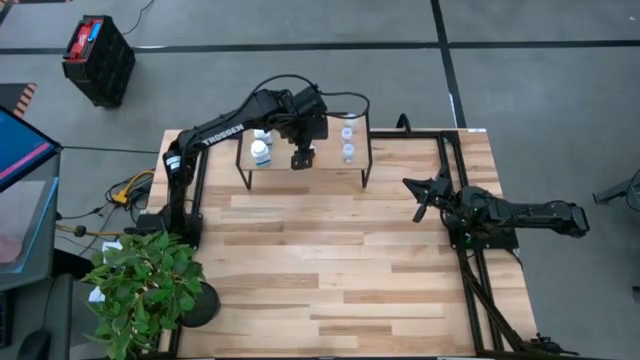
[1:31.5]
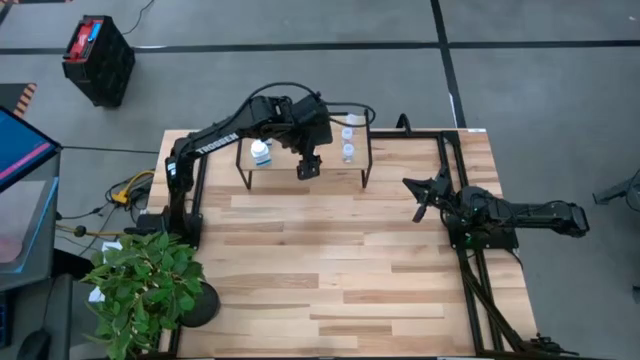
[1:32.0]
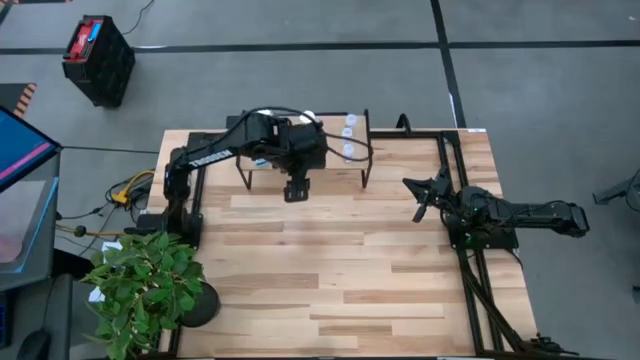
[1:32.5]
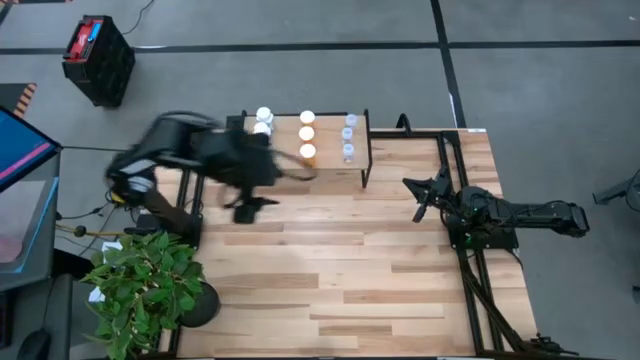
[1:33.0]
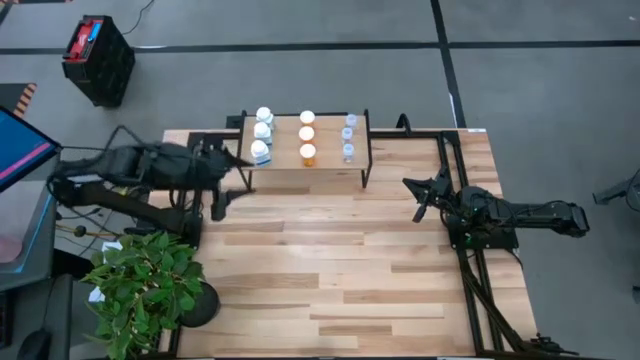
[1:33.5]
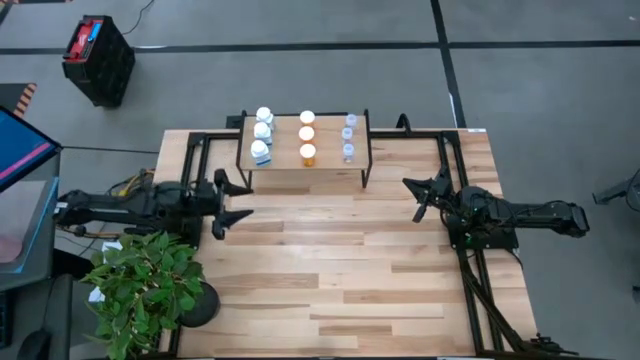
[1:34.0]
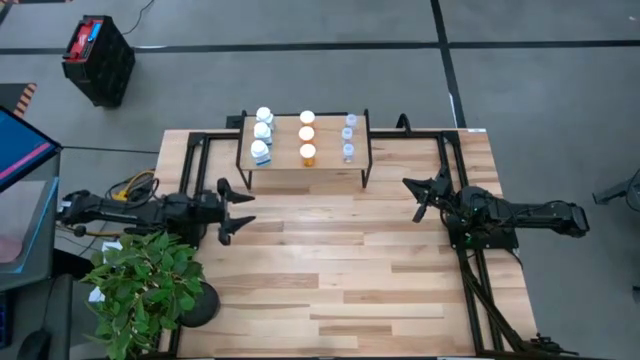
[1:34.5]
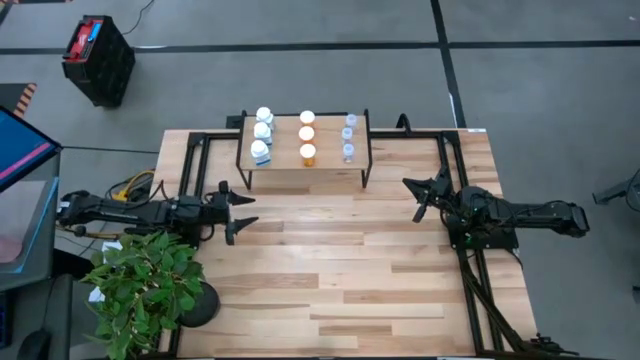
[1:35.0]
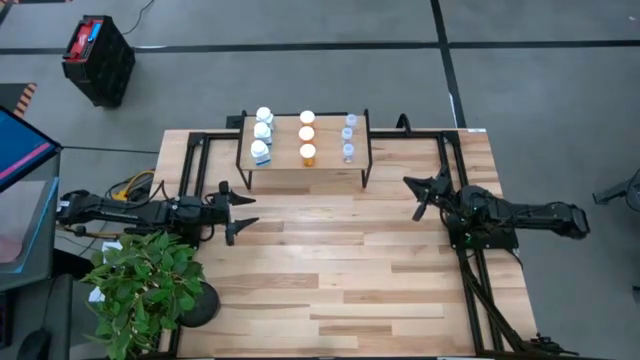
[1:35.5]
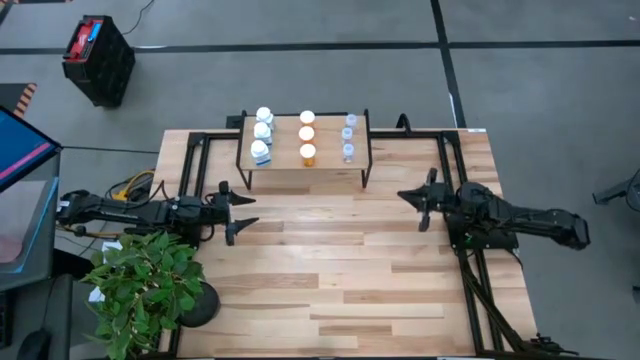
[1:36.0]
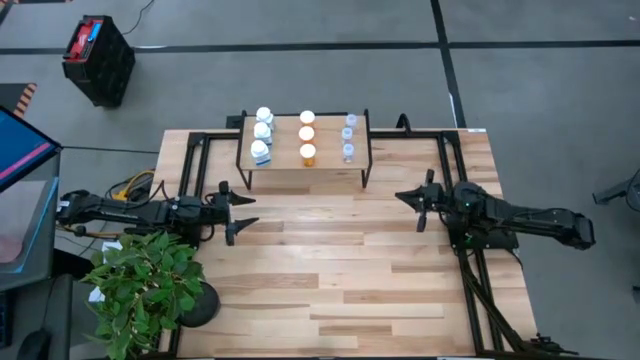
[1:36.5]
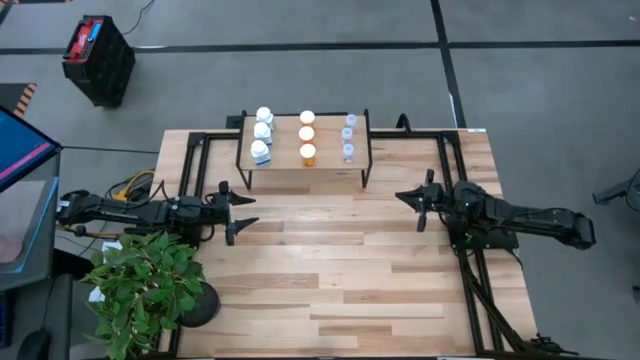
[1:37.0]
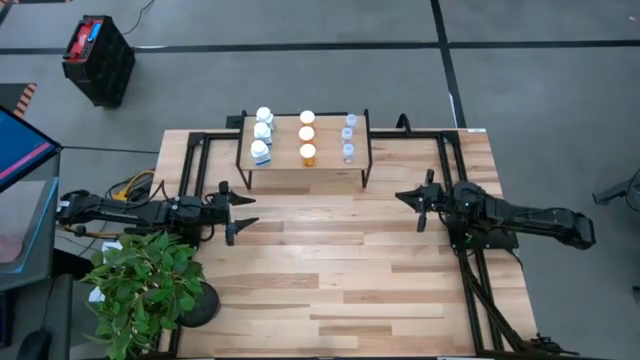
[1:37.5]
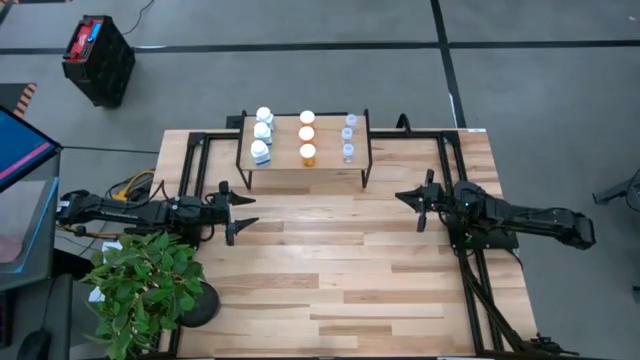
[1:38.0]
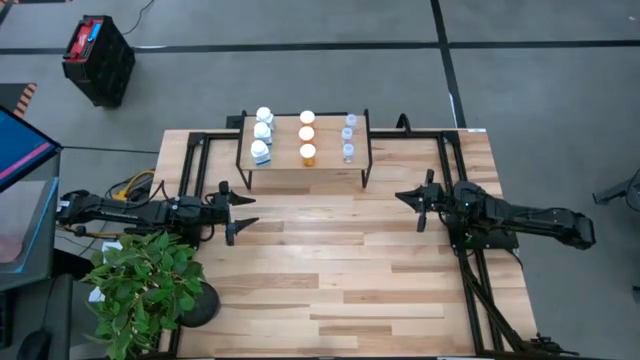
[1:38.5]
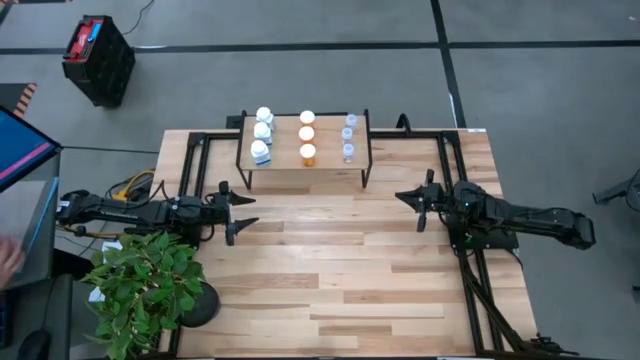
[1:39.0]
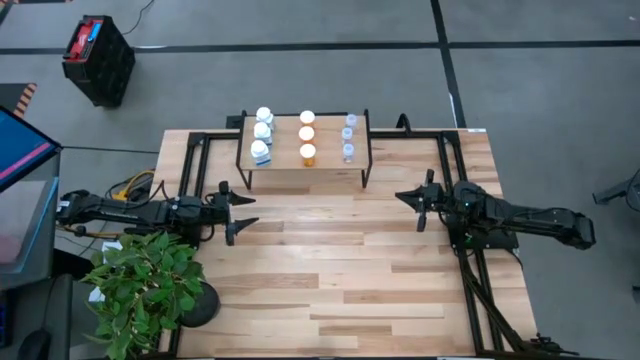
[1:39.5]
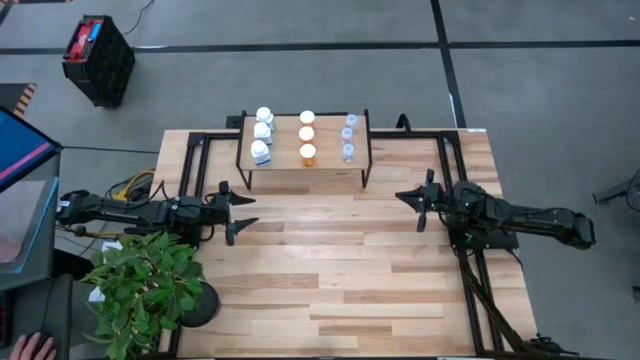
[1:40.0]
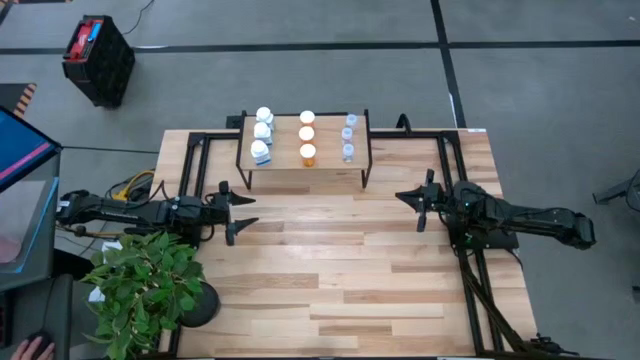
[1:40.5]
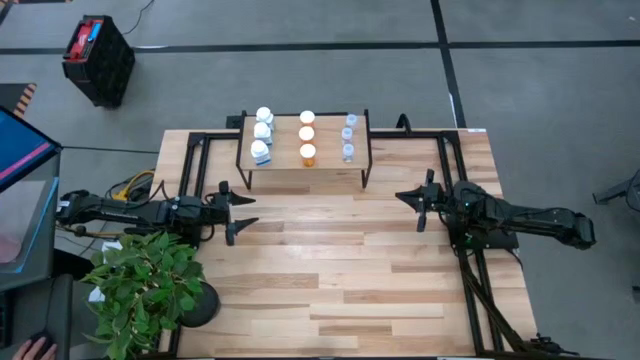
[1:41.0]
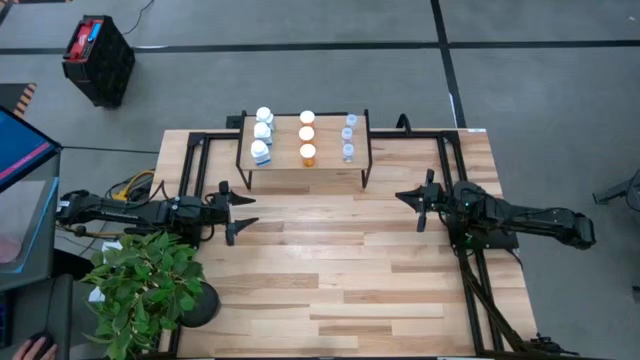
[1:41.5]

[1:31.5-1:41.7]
Task: Pick and place medicine bottles onto shelf by color
Return to Home Position

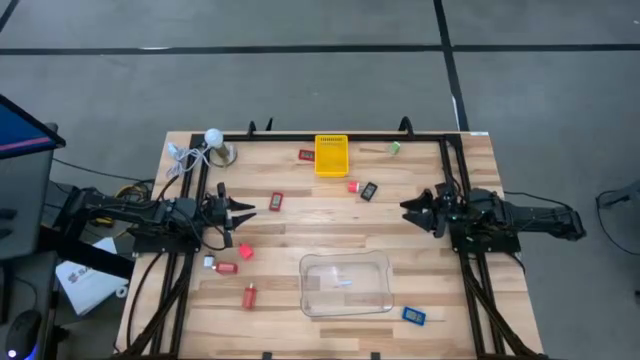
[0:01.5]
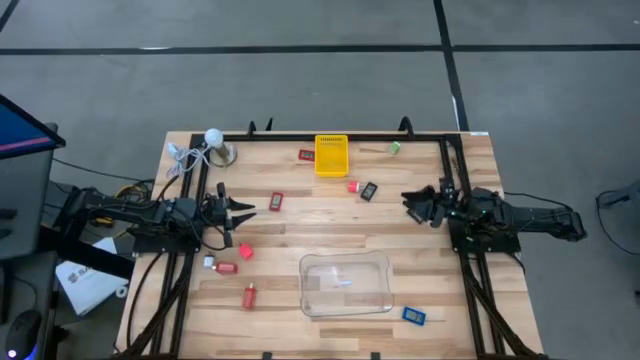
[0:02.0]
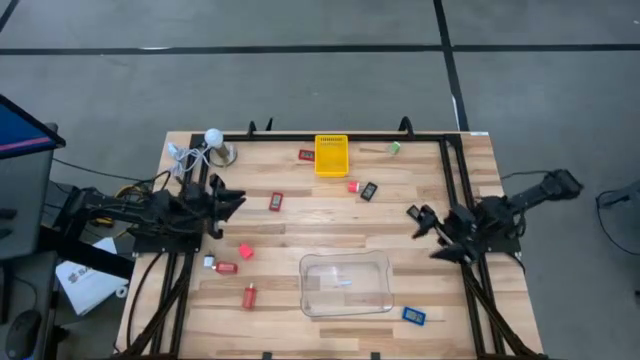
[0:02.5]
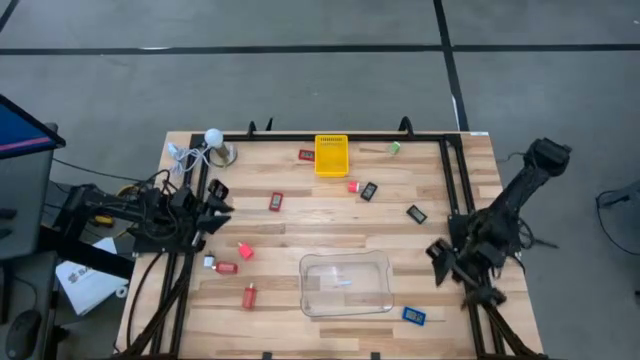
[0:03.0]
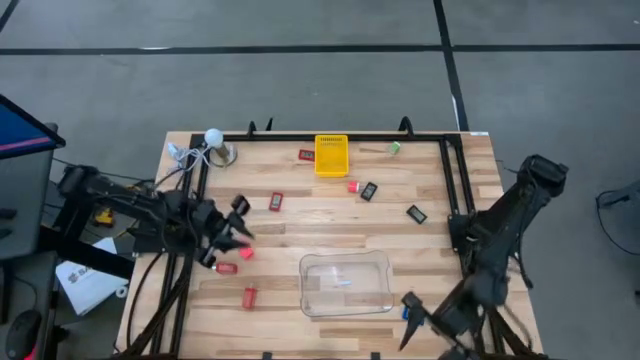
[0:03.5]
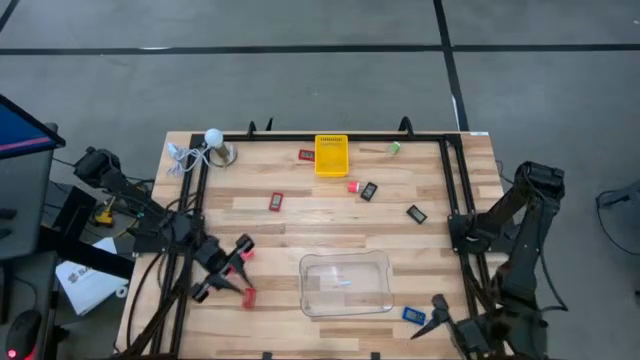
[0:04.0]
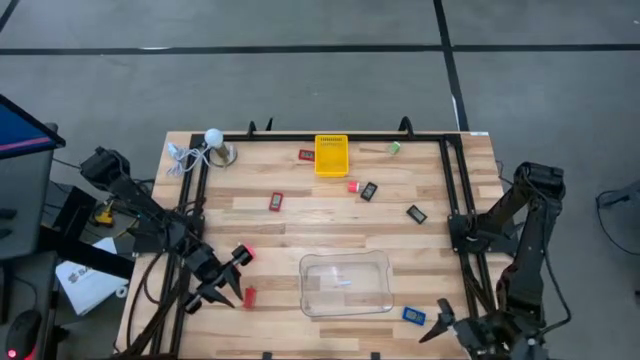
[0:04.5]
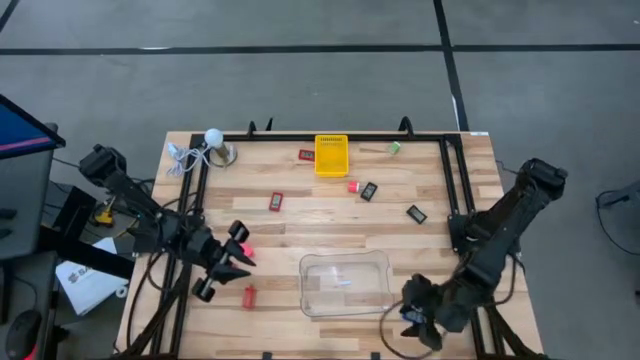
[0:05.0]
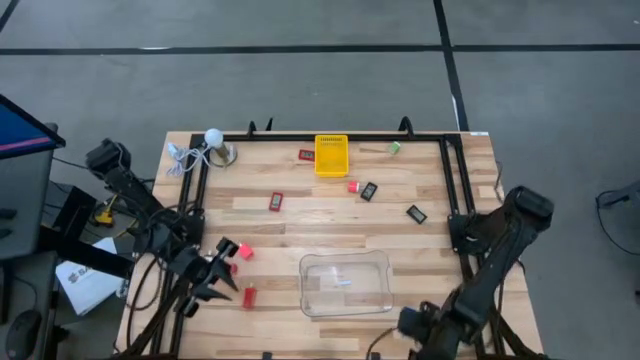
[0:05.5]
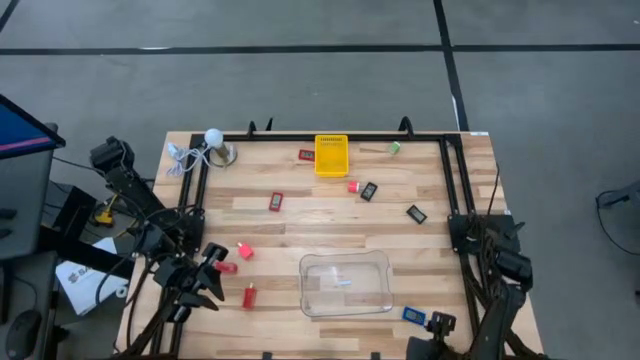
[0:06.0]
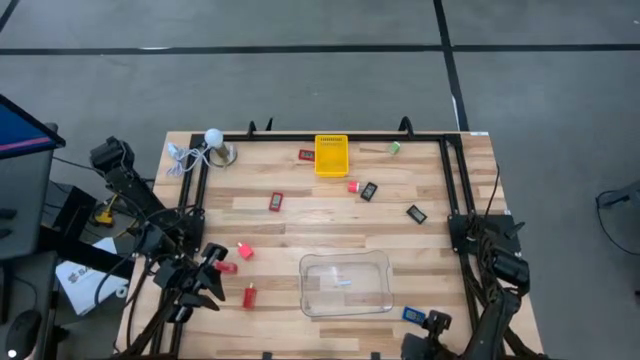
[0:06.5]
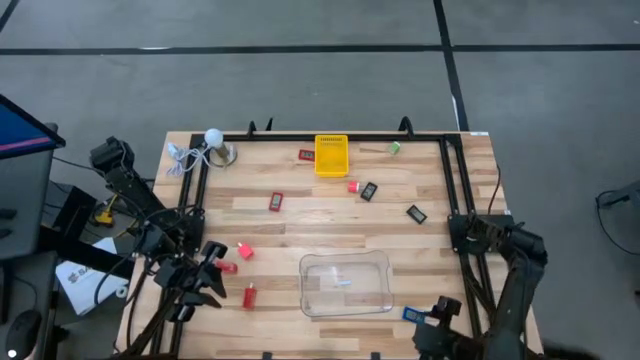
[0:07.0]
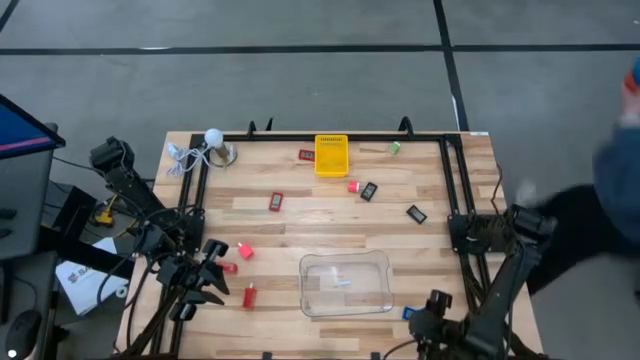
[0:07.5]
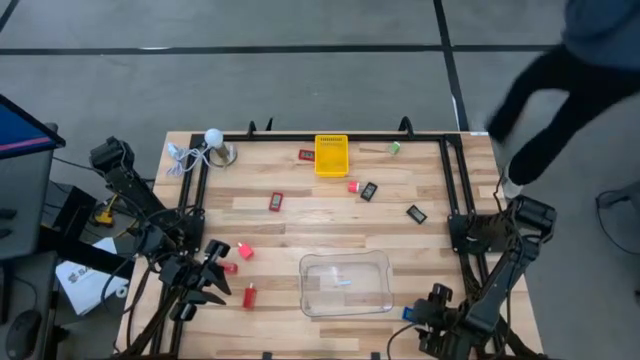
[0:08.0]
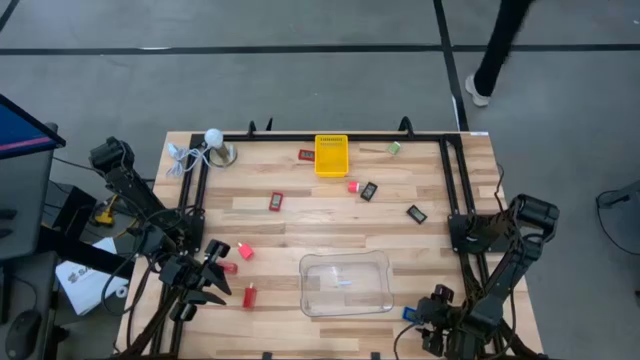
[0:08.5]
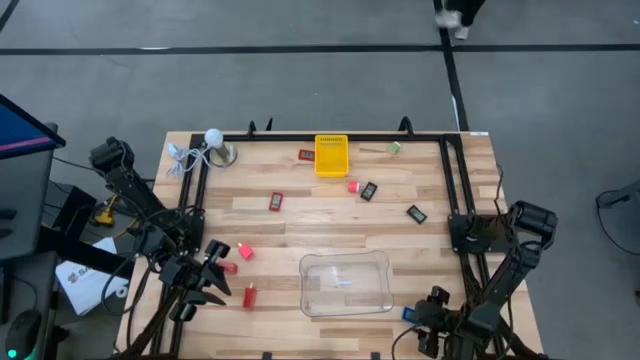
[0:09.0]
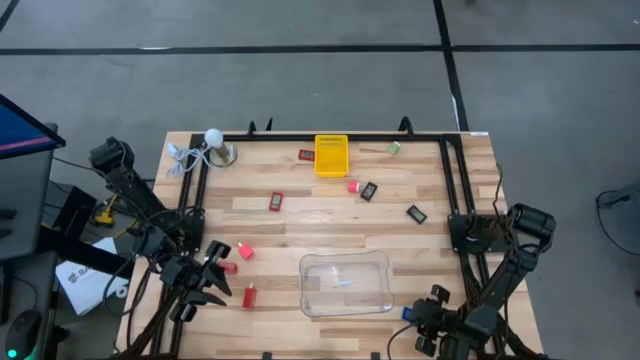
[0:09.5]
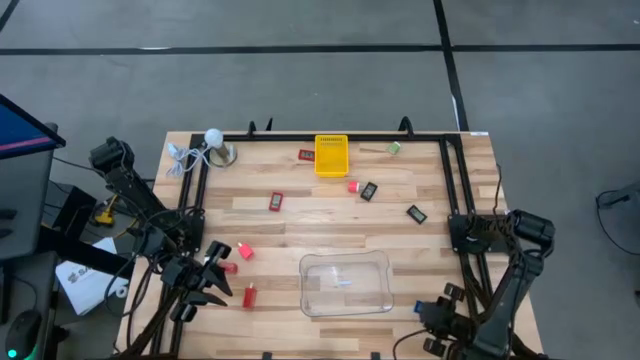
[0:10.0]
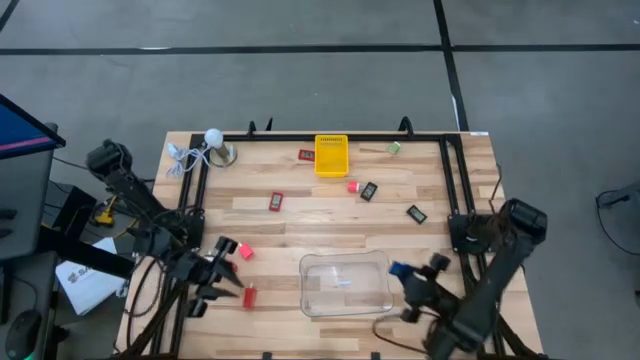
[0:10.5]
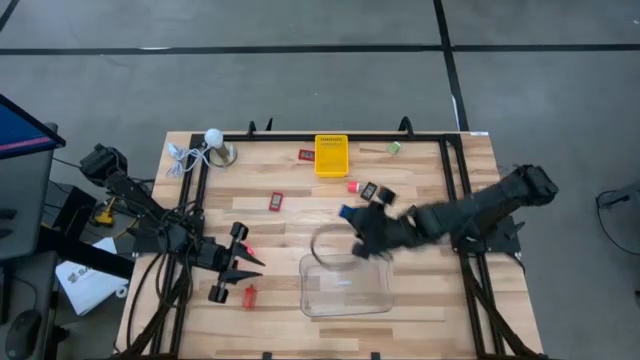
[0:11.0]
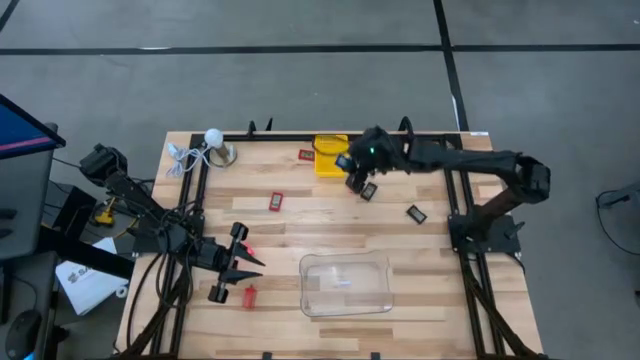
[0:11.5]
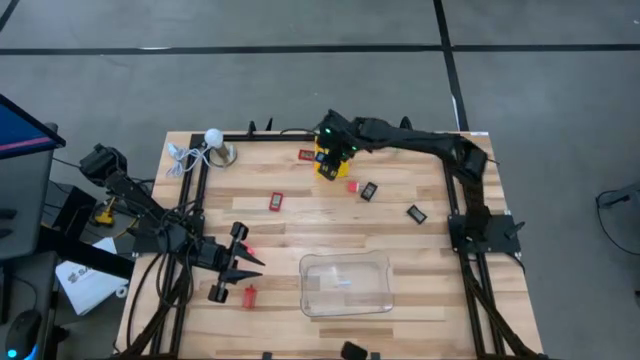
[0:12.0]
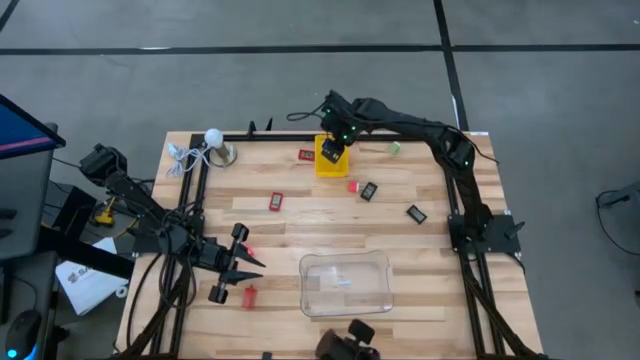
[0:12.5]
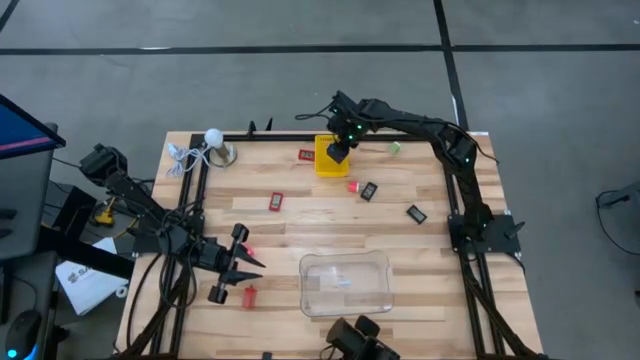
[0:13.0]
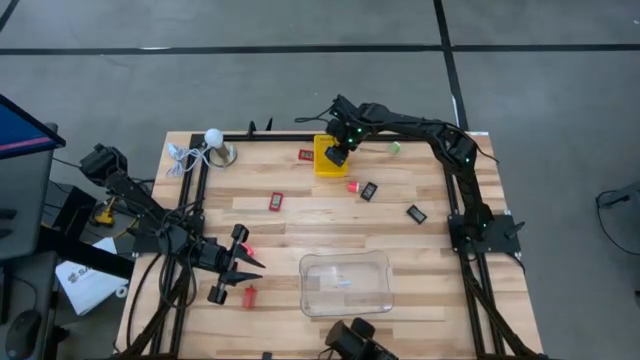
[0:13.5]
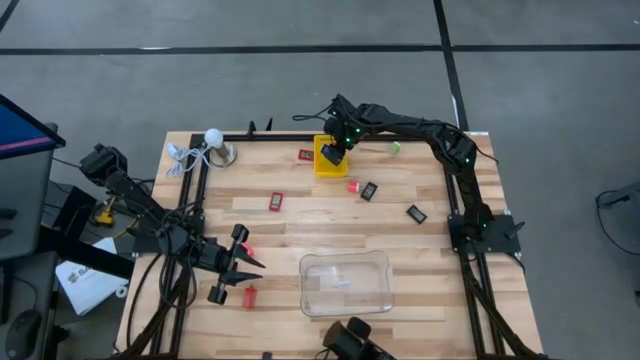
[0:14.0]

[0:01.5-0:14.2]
Task: Pick & Place Office items
Put the blue digital clock into the yellow bin
